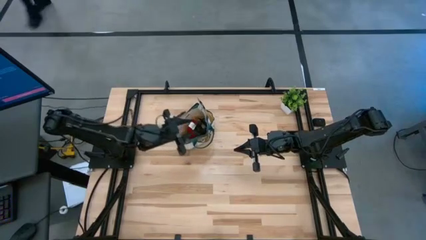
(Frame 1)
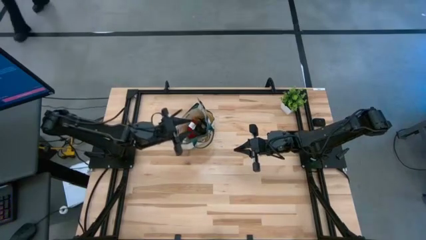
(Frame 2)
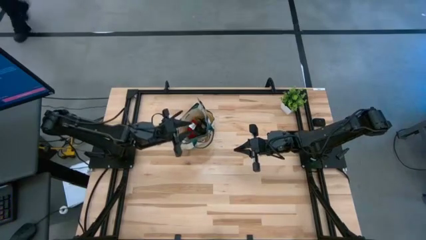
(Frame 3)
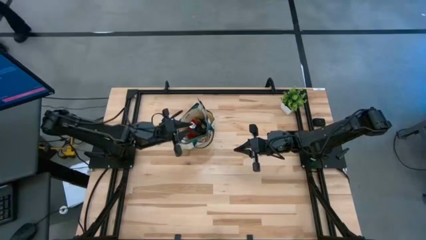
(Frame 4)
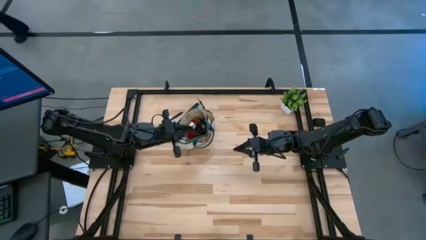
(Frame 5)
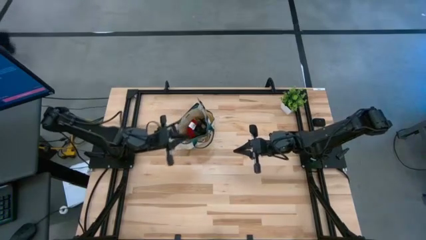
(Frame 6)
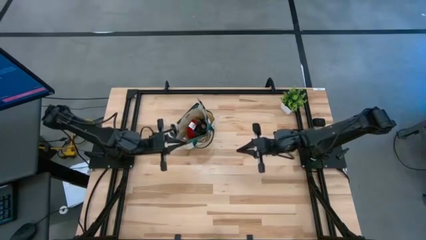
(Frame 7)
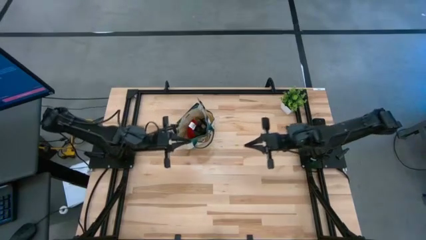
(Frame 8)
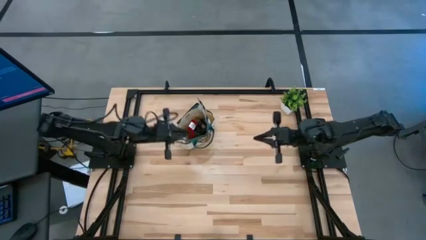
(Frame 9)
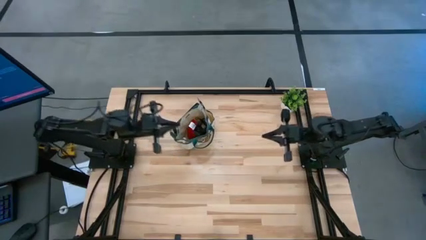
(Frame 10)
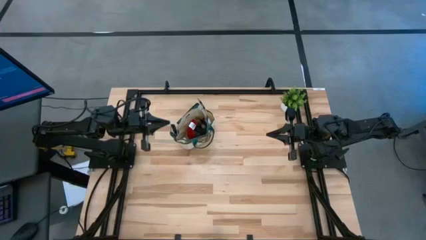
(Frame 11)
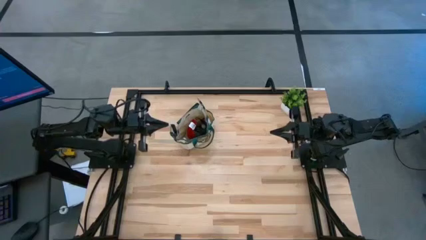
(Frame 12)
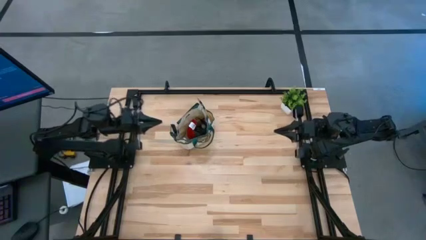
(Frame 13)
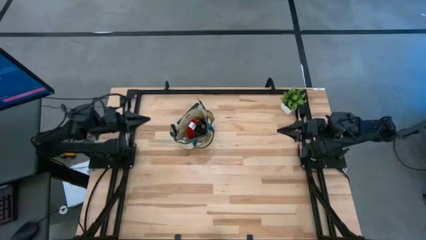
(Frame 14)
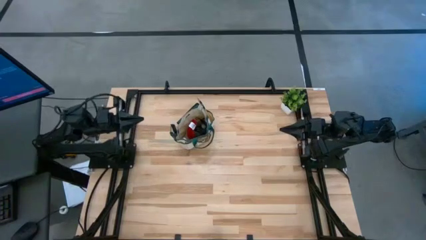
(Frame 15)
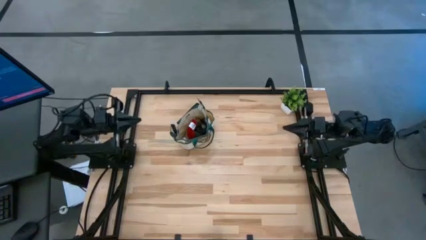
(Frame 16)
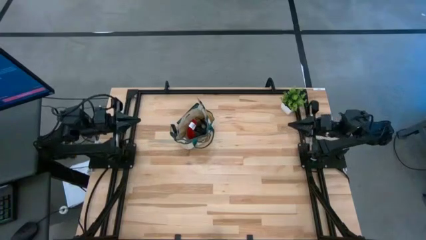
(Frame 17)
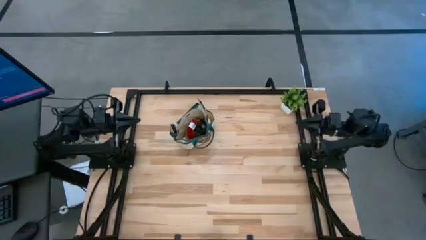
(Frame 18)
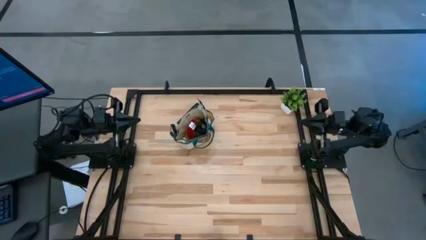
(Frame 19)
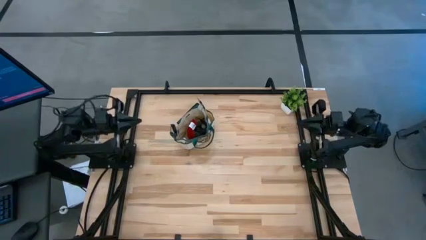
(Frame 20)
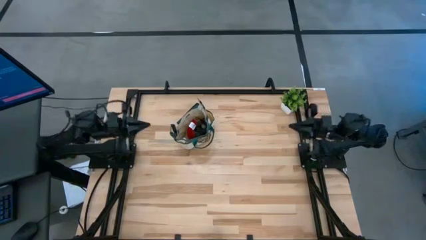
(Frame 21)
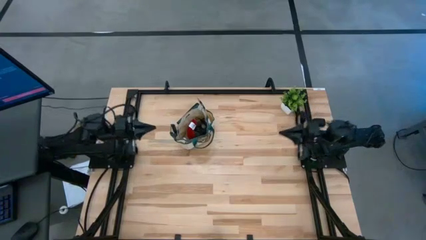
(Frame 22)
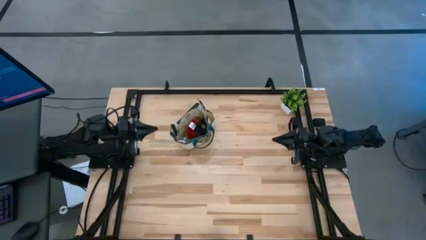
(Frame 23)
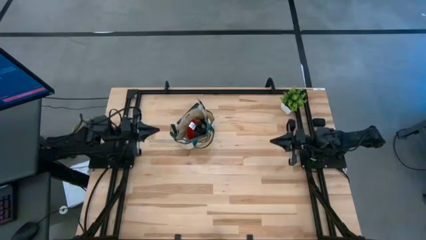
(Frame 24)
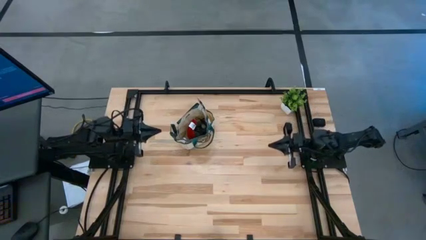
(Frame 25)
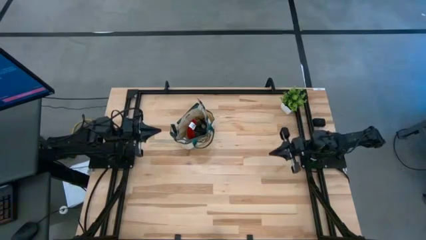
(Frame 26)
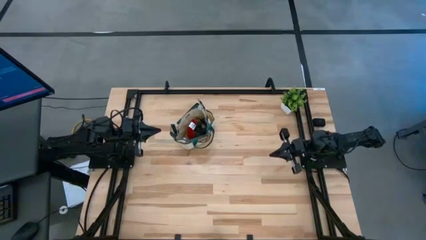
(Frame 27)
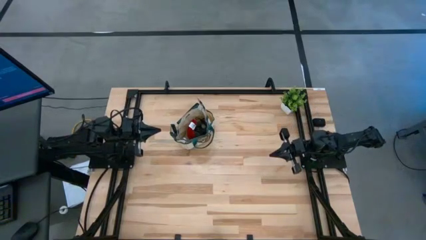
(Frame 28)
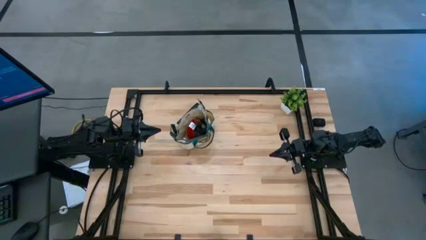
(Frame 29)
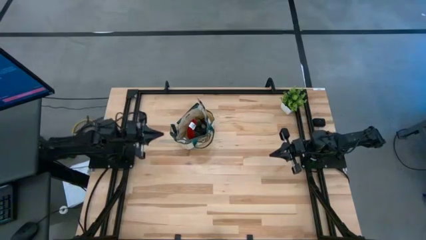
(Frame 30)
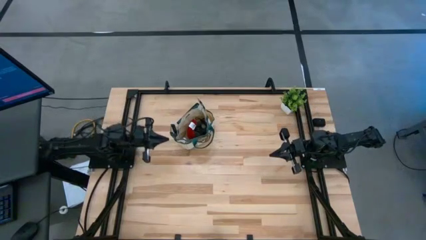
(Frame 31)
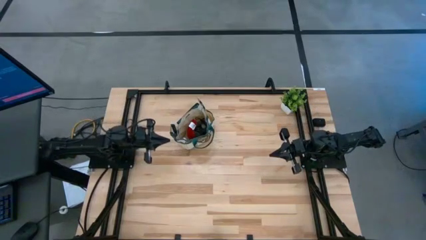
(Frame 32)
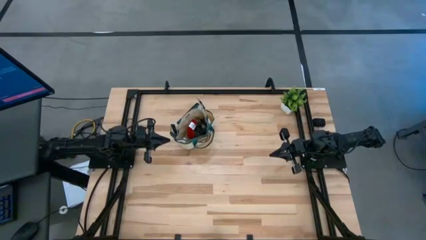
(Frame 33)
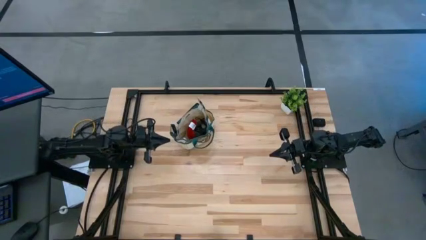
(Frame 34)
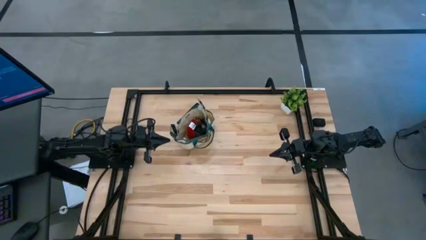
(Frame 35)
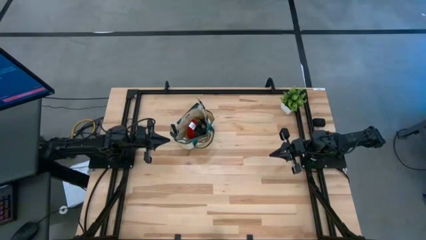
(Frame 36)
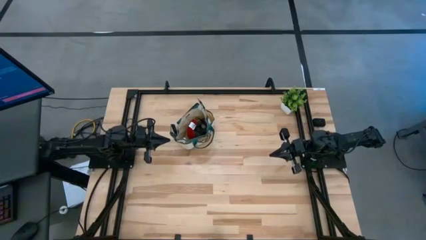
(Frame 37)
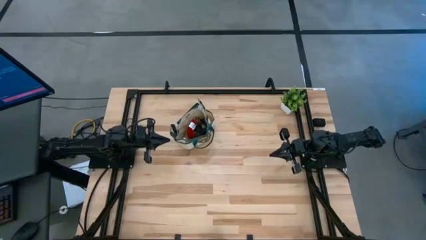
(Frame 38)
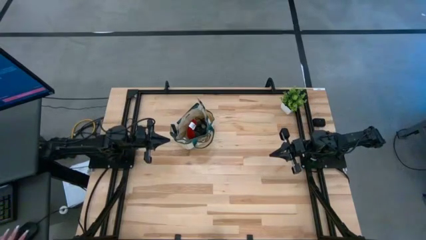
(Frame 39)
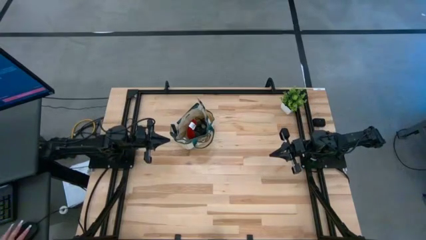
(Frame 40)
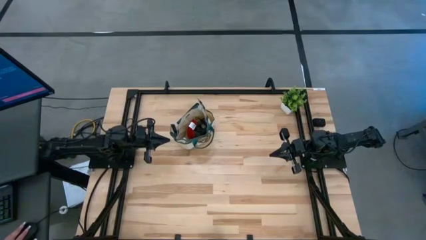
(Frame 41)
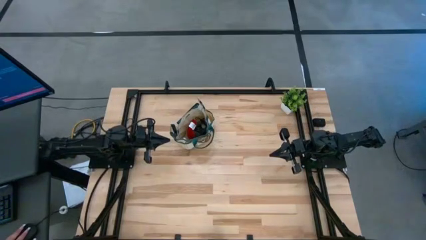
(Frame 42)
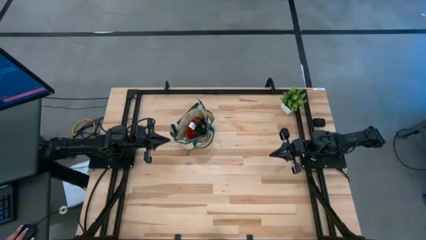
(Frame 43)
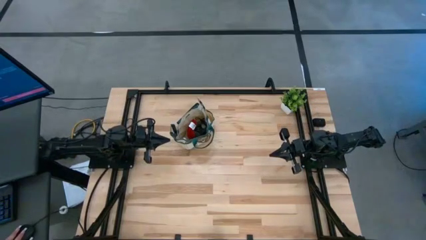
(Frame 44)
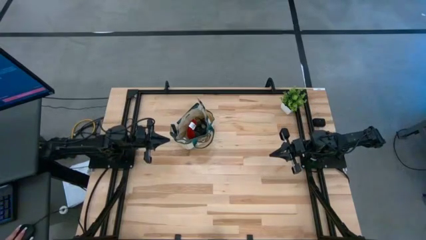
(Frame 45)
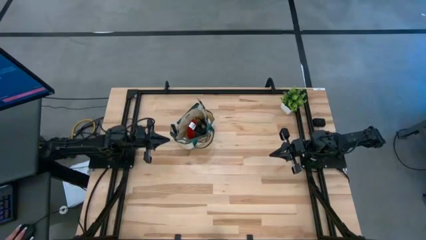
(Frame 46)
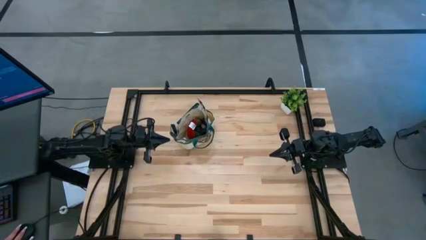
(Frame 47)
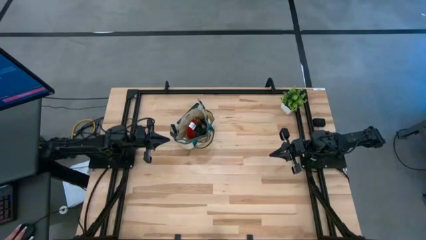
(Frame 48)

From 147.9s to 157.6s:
Task: Pick & Place Garden tools in Gardening bag
Return to Home Position

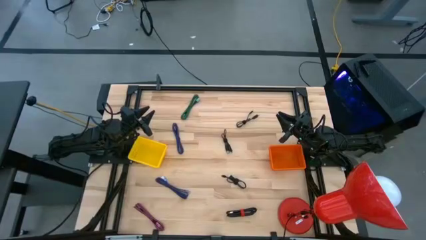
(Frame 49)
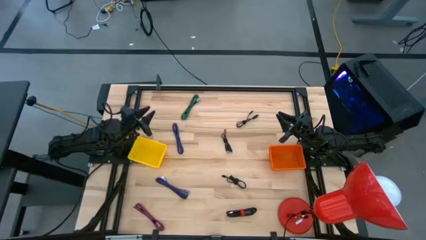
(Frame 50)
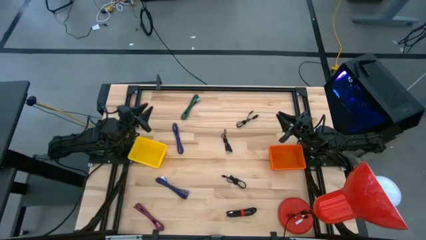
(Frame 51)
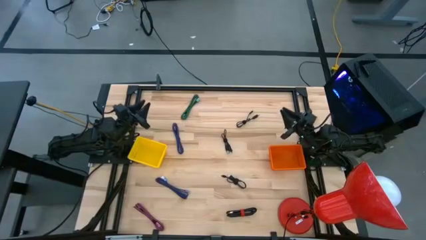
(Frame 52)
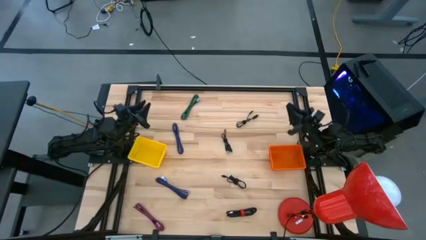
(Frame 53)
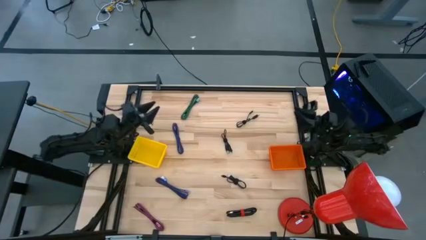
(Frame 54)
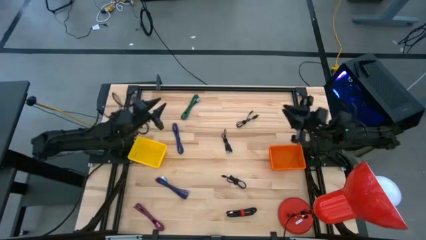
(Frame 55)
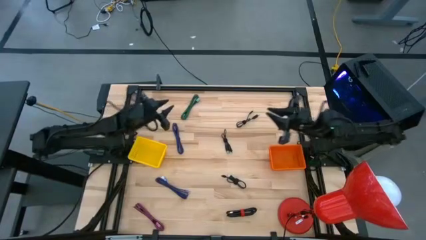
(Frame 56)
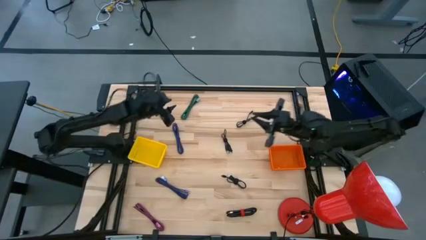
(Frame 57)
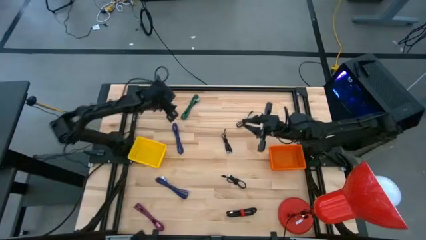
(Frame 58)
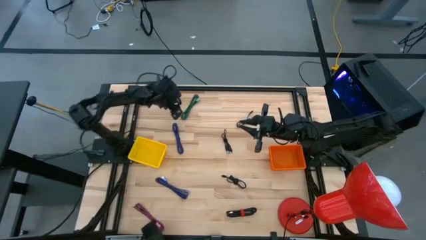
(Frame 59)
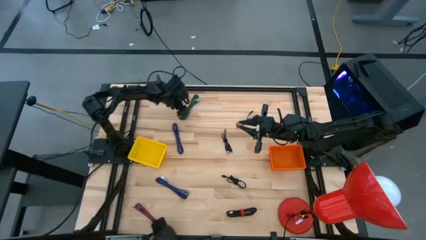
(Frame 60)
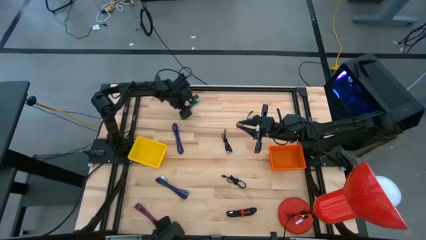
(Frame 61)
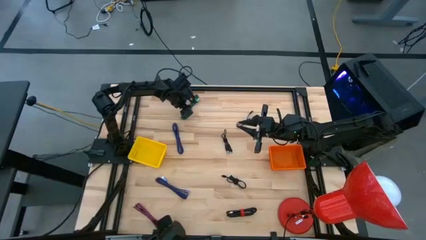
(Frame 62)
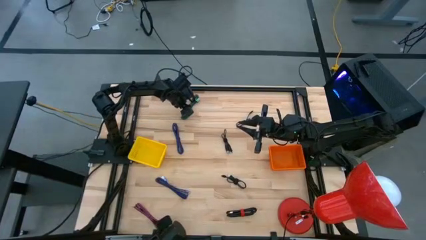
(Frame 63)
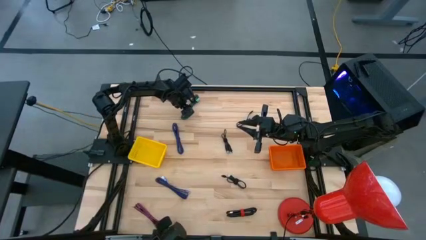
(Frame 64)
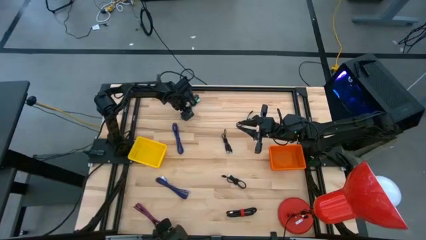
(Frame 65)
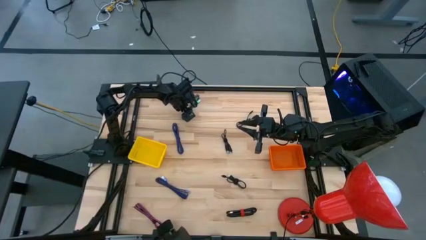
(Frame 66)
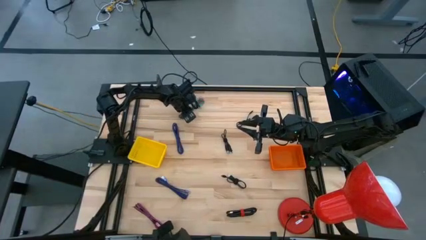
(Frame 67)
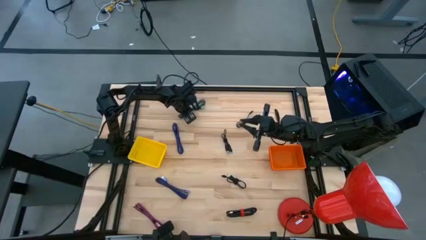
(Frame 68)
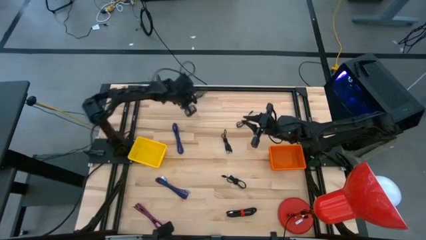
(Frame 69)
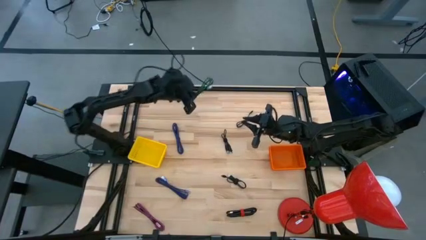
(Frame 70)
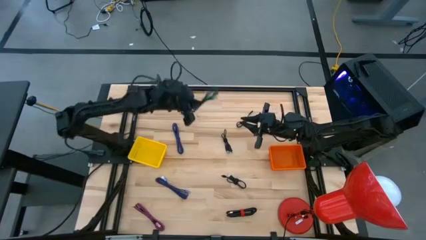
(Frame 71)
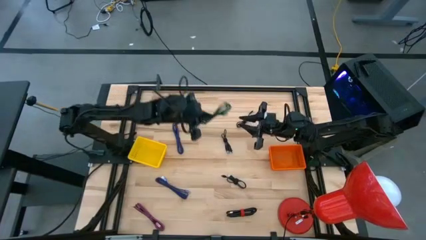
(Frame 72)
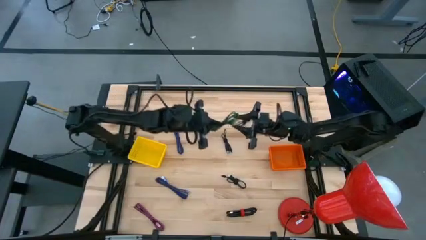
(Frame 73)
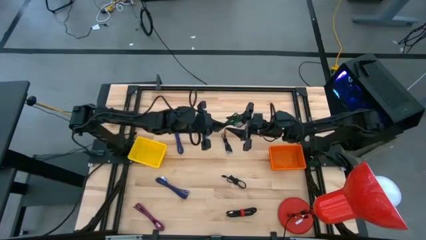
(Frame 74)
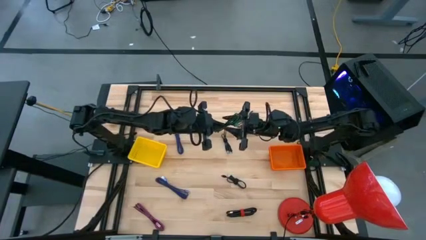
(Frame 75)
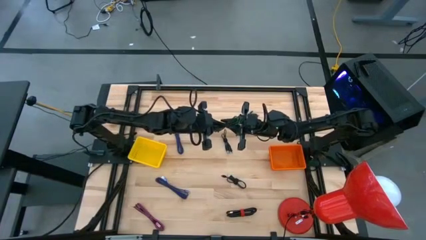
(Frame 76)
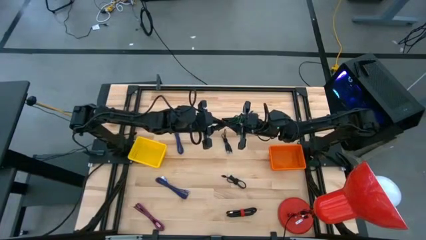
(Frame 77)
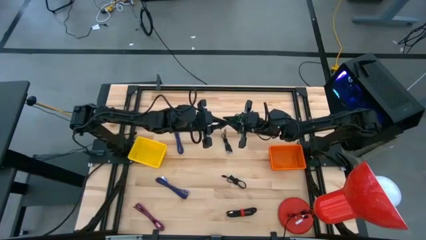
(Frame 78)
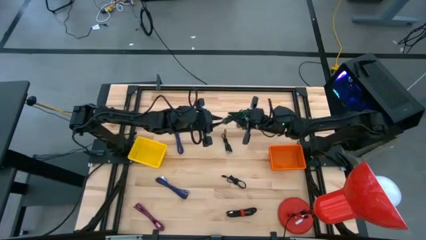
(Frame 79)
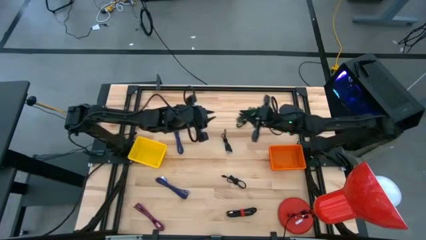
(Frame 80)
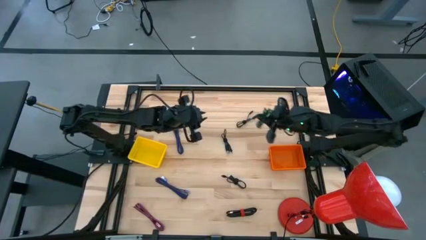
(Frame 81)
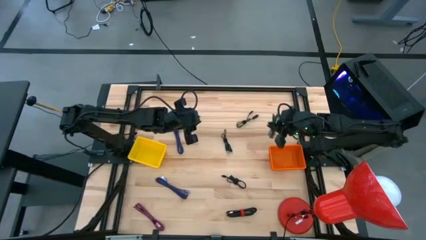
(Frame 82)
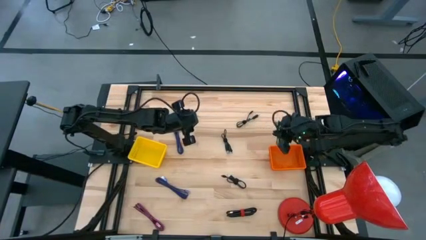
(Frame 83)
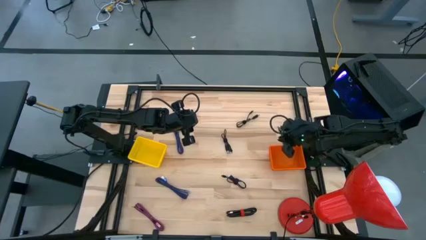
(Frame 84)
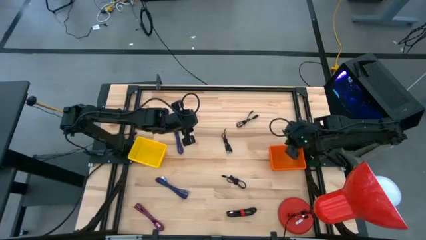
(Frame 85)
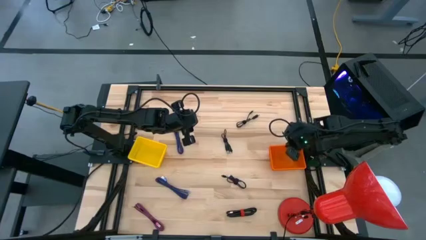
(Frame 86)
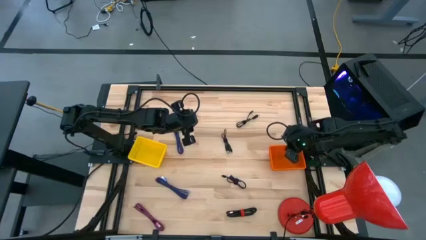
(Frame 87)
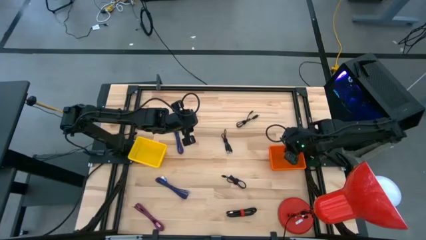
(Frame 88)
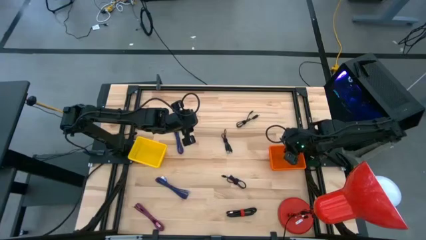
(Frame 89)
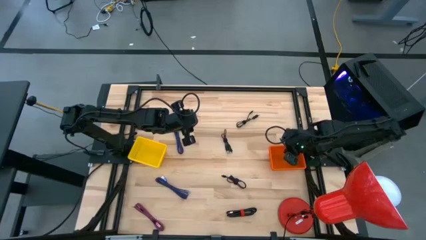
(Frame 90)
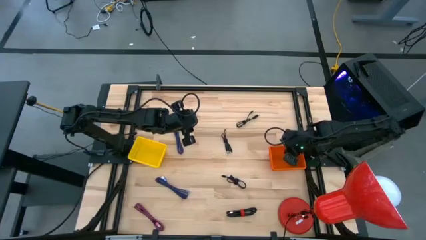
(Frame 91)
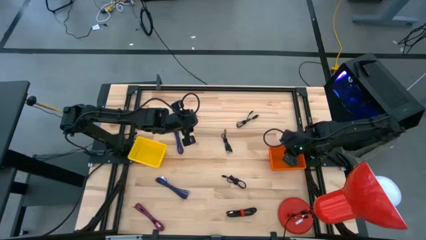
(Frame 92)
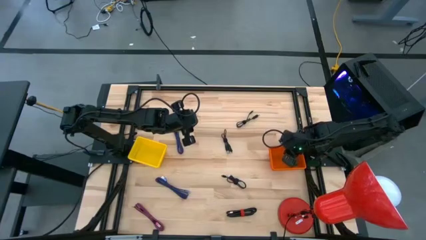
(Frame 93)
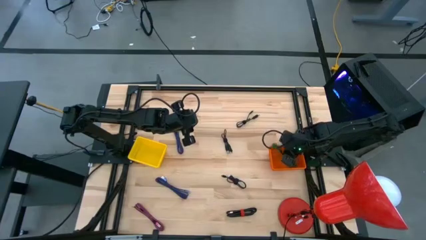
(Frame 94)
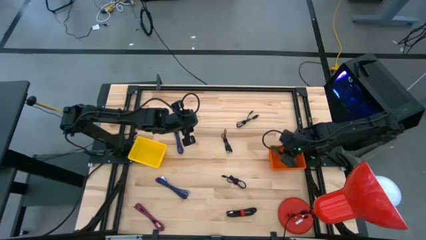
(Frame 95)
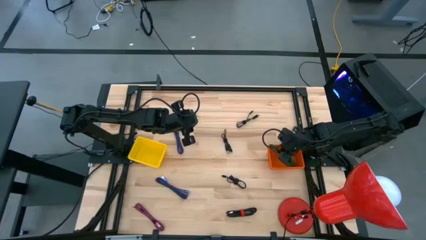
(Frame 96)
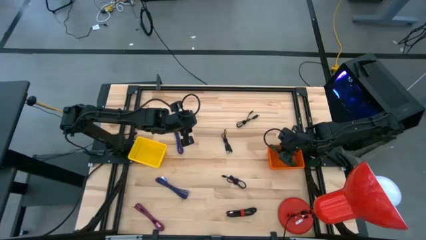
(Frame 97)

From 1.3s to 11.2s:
Task: Pick & Place USB Port
Put the black charger cable into the orange basket
